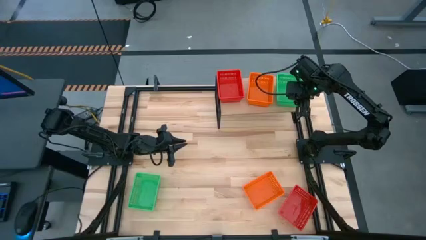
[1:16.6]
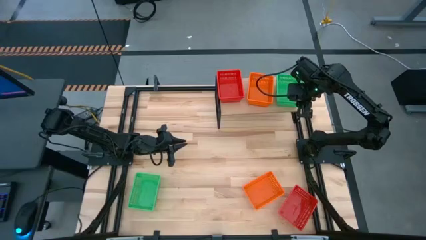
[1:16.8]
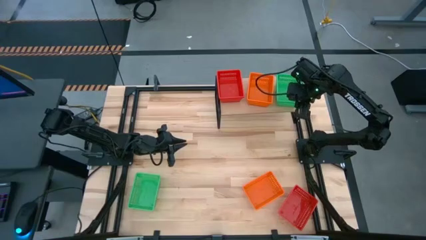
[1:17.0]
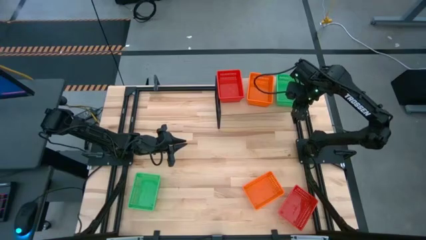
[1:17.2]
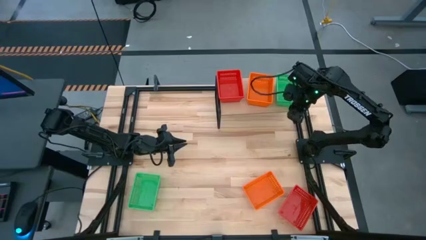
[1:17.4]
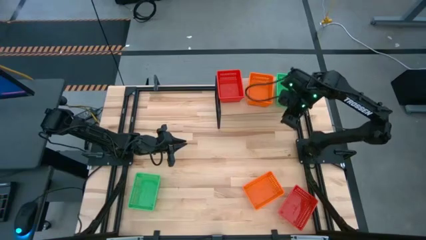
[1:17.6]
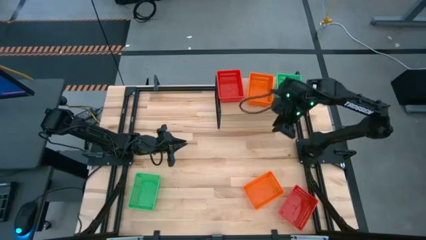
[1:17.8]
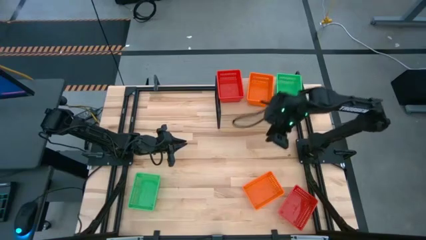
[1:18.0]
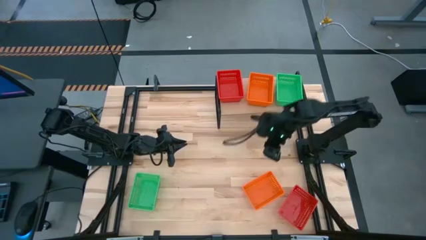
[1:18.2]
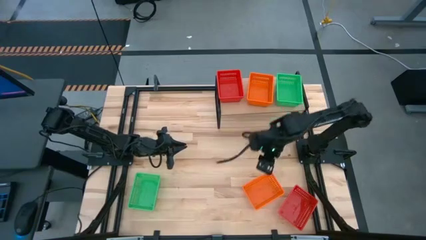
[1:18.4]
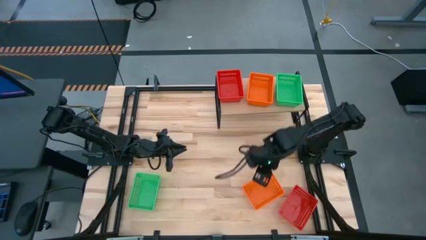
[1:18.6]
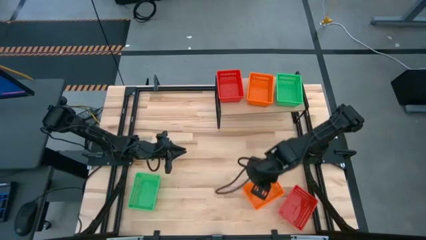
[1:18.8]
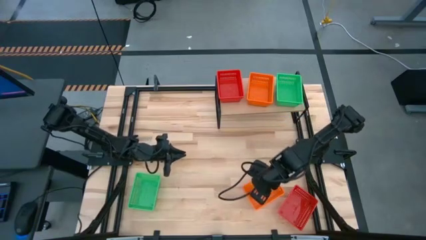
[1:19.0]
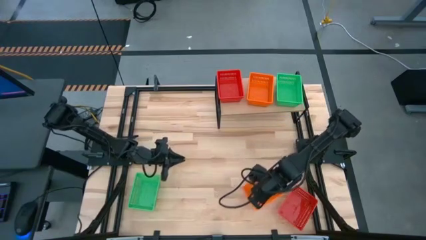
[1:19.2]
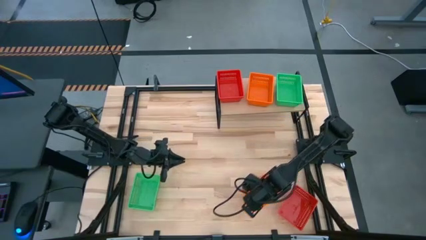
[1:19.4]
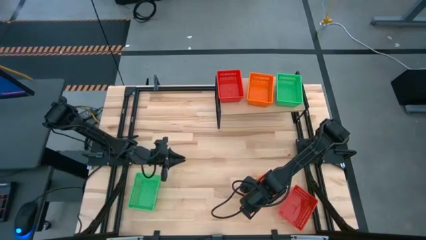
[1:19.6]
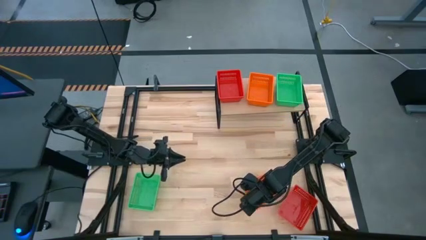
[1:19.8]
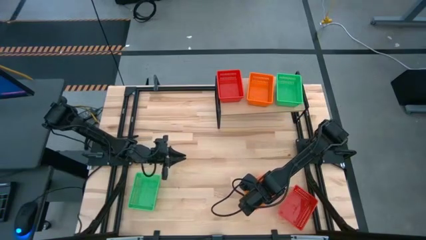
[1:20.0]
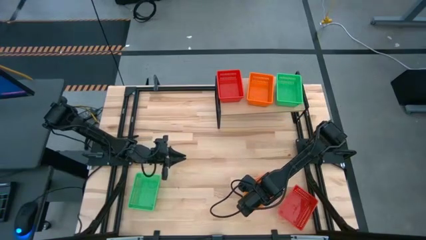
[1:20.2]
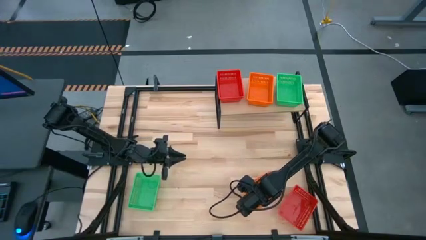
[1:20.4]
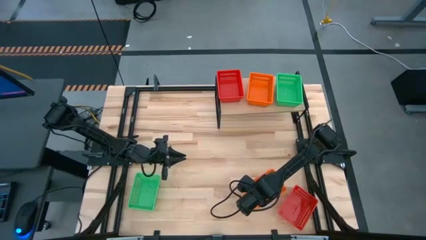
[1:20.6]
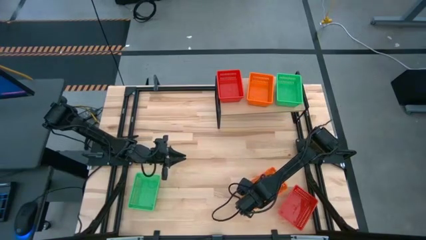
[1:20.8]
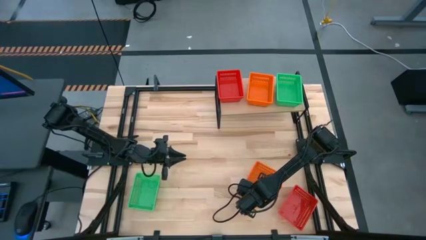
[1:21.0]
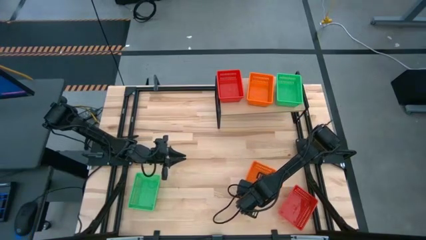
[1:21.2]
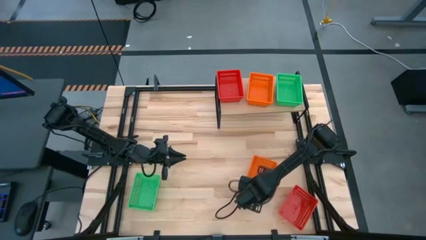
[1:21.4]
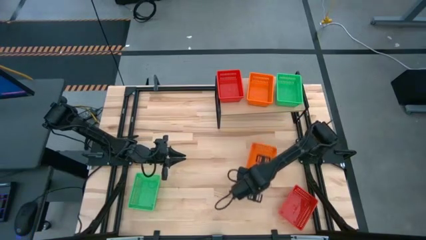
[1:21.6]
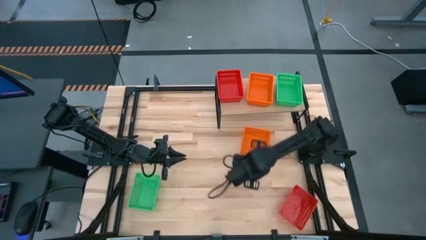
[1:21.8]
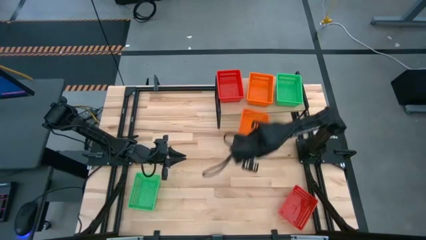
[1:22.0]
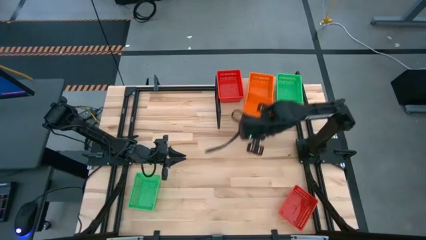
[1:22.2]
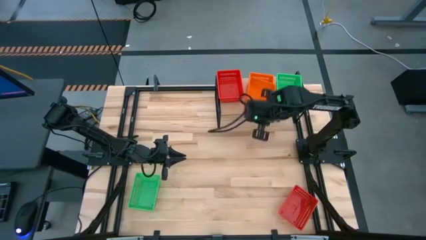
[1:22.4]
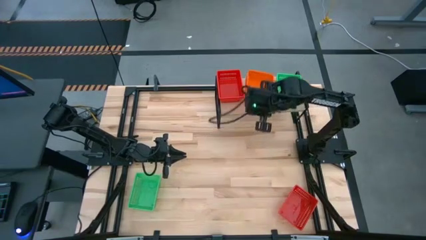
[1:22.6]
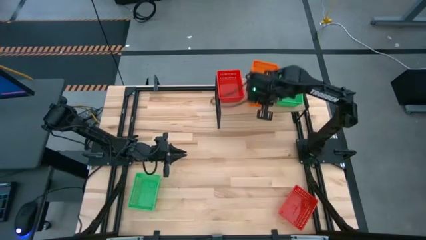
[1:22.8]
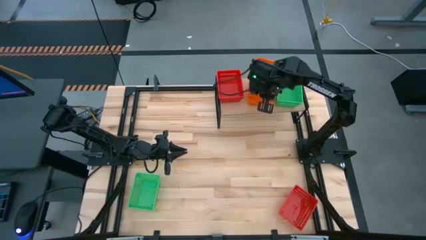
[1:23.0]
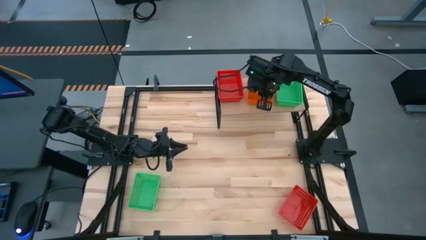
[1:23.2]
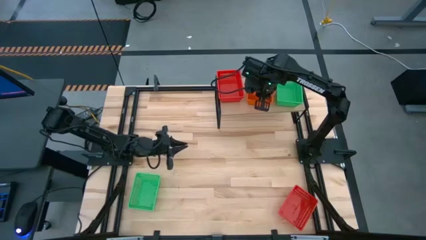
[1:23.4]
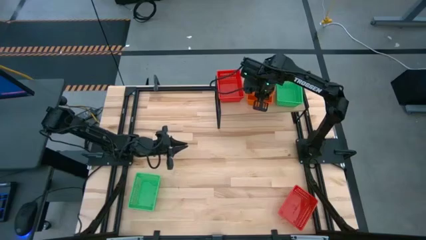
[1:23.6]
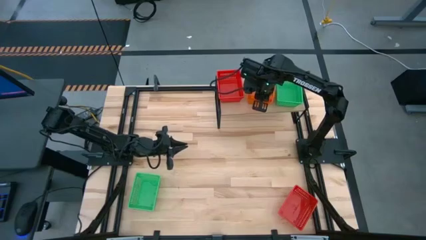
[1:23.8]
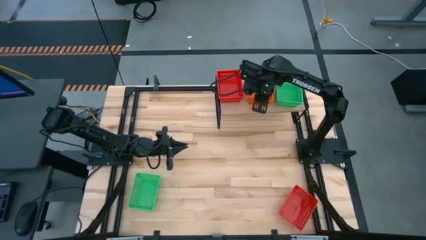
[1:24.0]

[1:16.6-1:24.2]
Task: Stack baskets on shelf by color
Stack the orange bin on top of the orange bin on the shelf

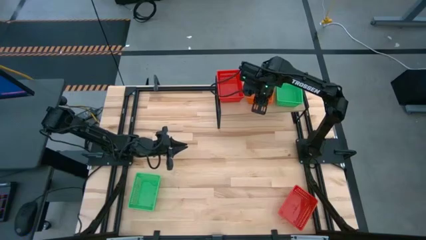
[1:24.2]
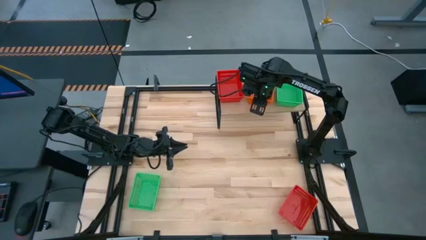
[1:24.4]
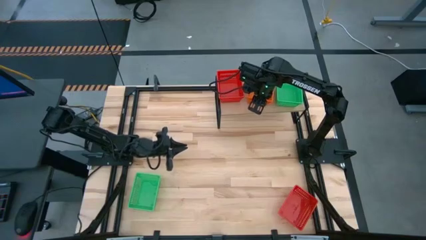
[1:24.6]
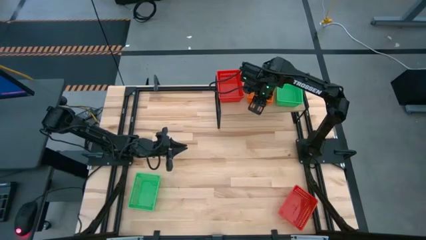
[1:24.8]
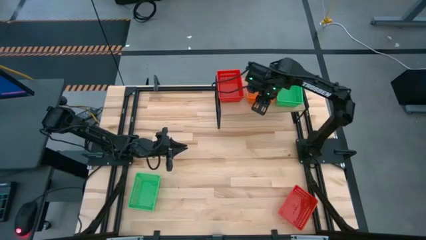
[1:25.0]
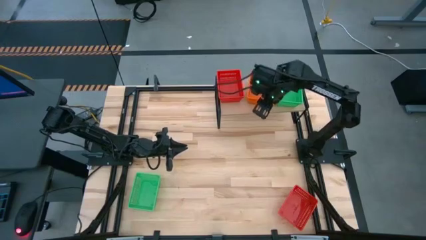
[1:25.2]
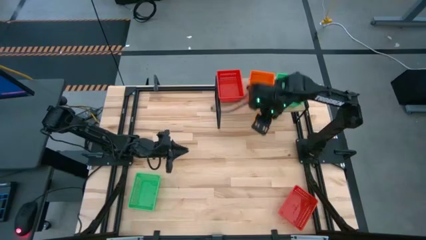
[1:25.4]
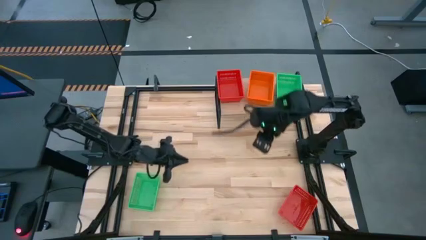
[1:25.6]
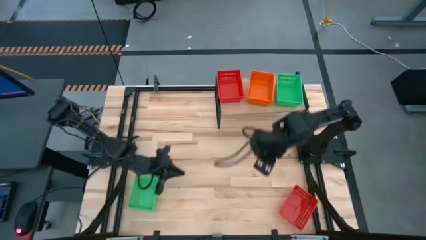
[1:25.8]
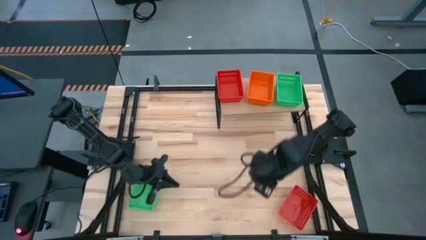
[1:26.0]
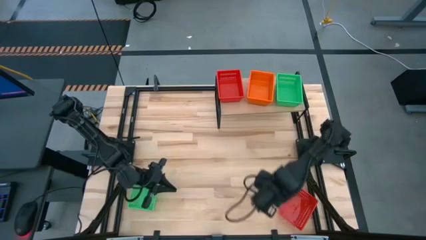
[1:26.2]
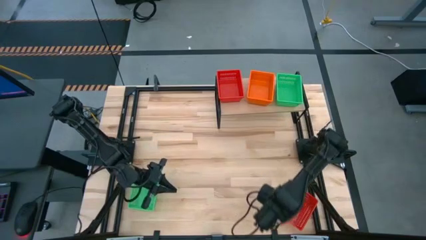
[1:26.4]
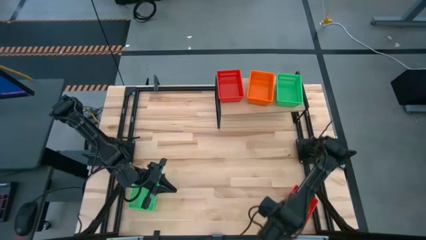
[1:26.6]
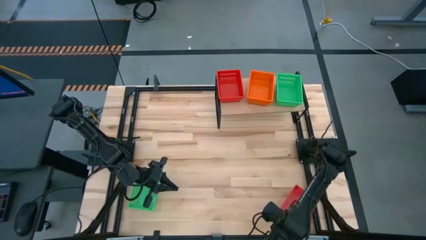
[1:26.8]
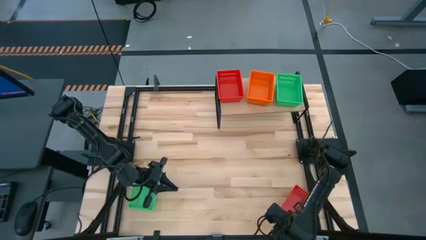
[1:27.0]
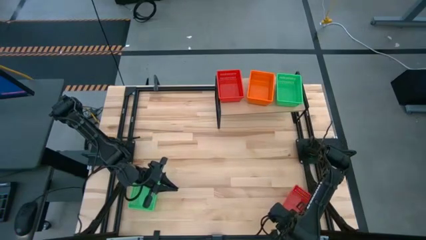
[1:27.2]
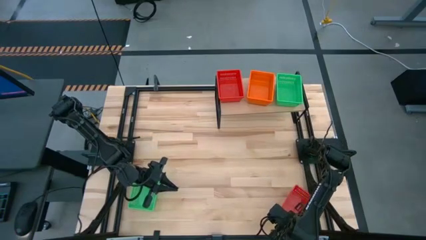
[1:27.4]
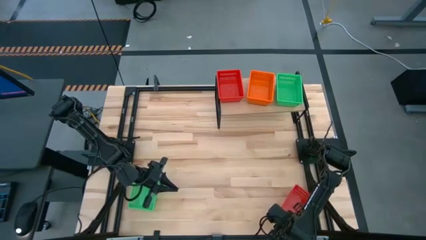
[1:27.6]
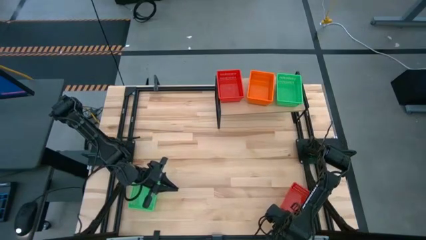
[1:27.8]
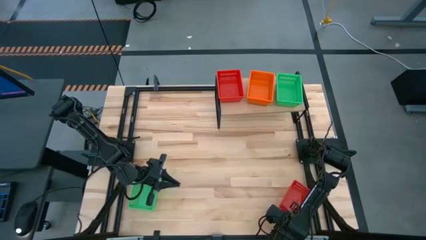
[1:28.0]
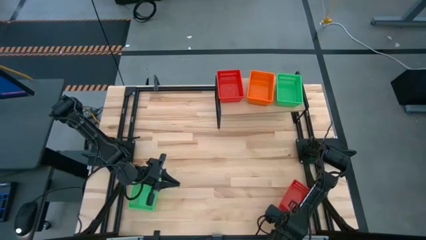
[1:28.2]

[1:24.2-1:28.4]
Stack the red bin on top of the red bin on the shelf

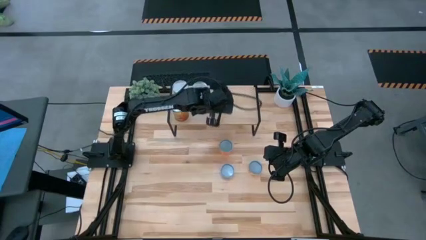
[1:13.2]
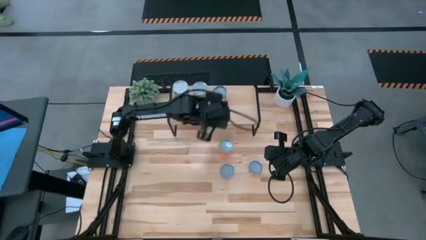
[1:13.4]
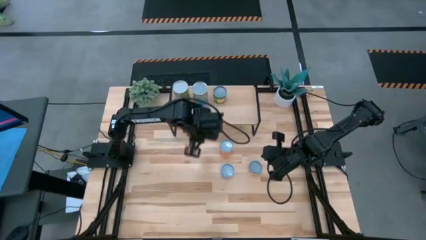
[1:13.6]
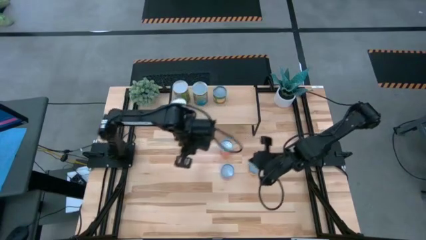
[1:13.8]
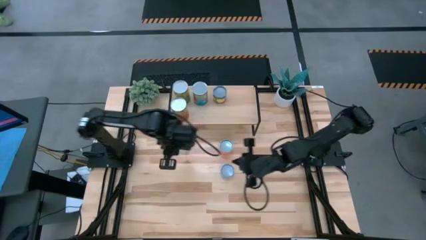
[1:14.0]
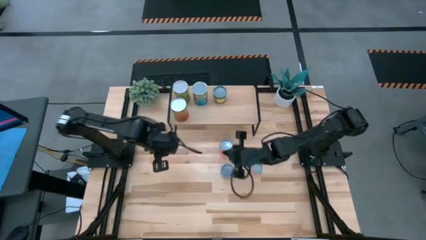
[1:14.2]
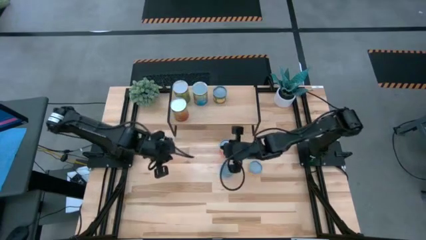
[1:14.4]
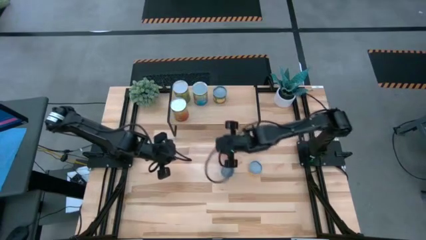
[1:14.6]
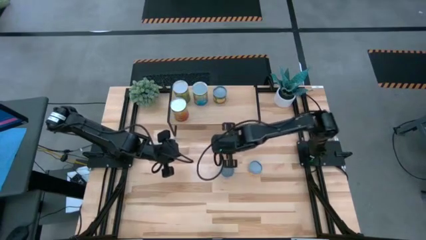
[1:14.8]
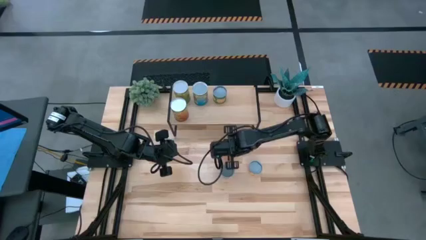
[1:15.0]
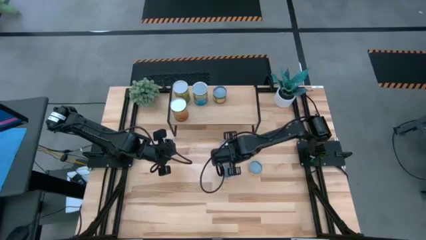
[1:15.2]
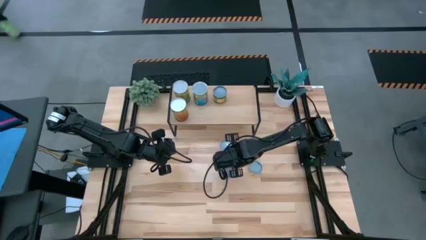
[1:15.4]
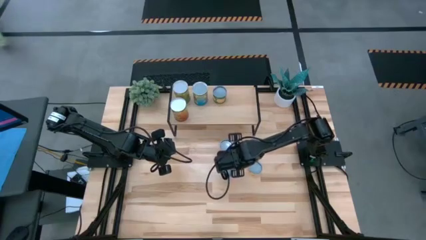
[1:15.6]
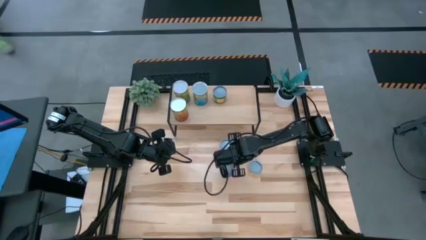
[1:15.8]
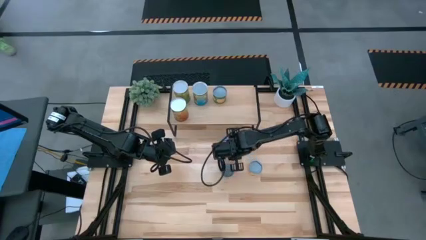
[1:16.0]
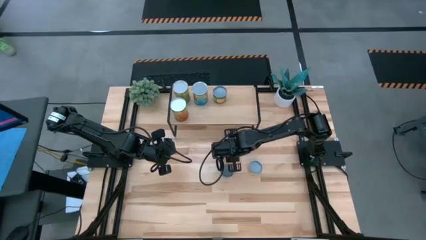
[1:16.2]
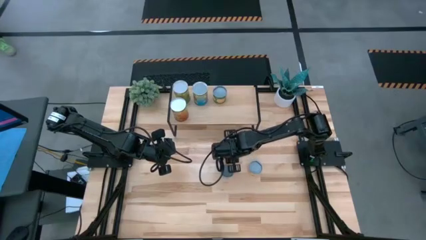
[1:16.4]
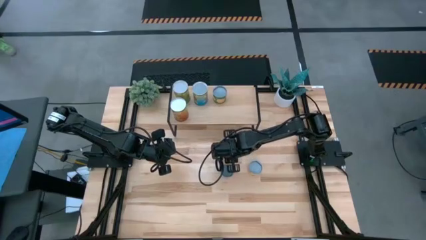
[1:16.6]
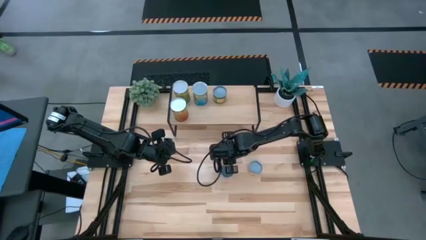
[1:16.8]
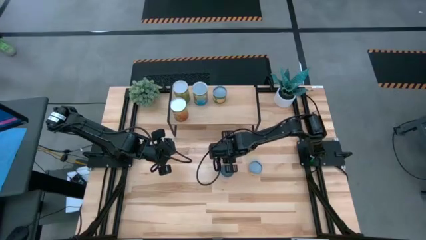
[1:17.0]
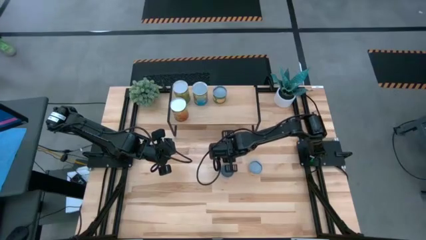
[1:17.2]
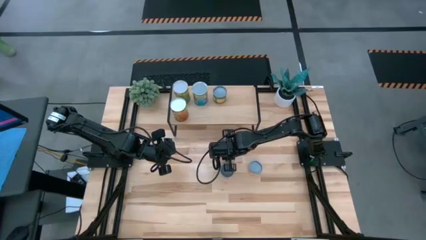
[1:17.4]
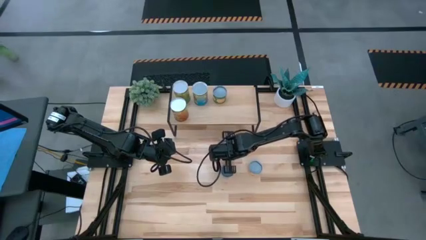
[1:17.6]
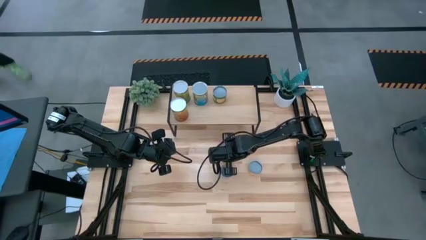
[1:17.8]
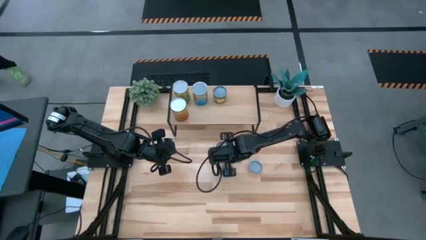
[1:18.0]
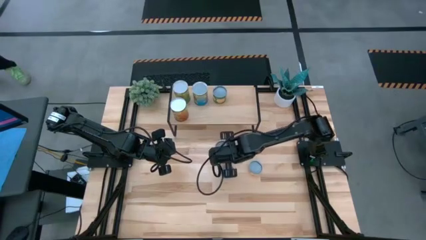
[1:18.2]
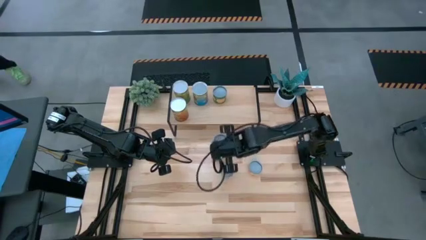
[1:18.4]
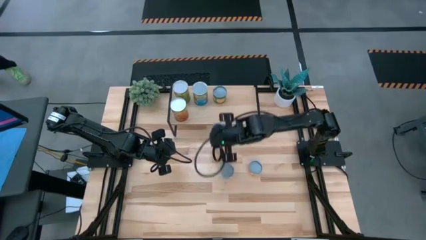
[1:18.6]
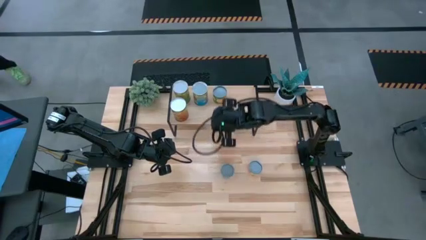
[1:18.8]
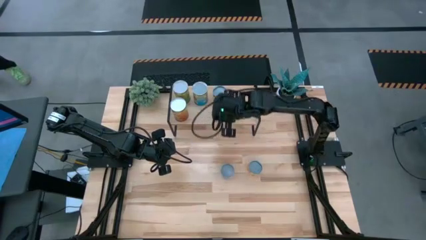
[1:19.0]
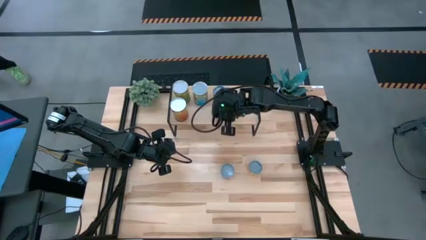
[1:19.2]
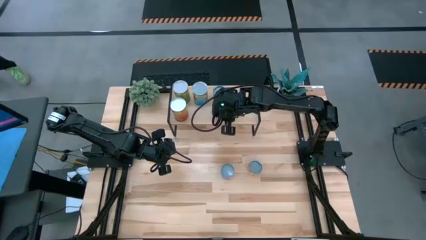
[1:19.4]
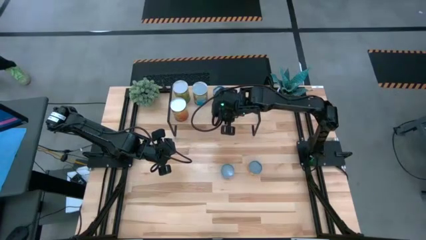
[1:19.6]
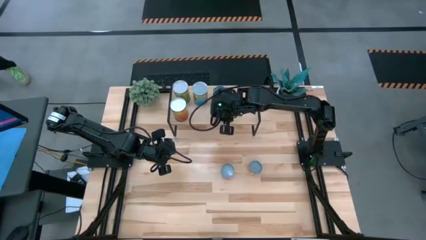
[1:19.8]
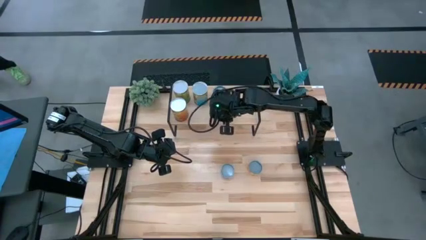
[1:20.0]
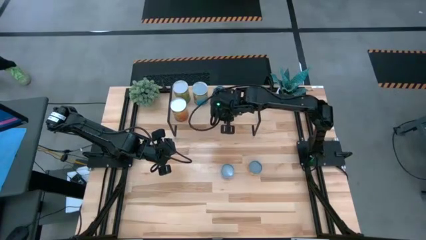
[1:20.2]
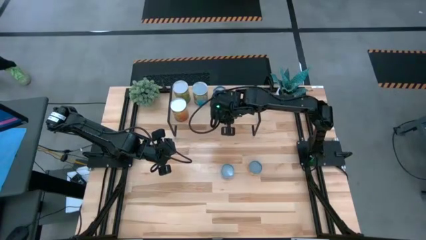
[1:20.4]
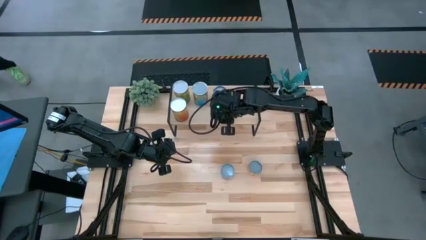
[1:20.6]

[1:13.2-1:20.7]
Task: Pick and place cans onto a shelf
Put the canned meatballs on the shelf
